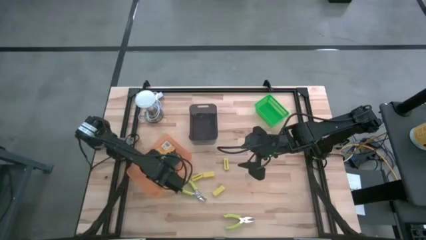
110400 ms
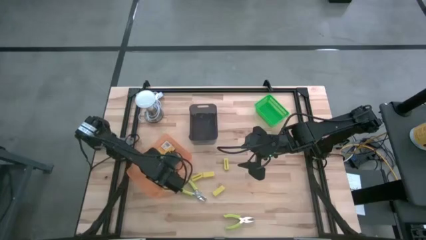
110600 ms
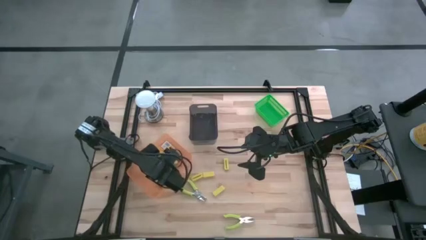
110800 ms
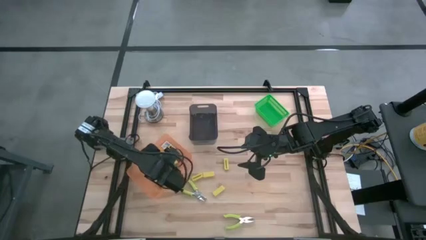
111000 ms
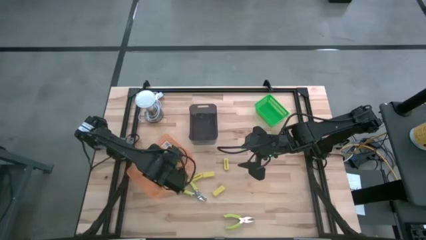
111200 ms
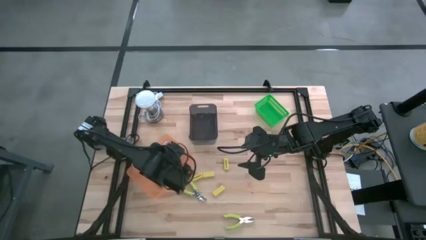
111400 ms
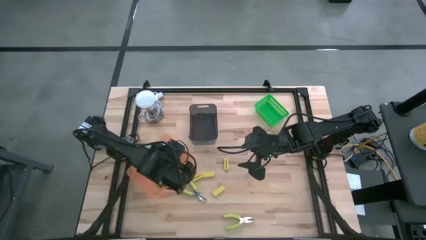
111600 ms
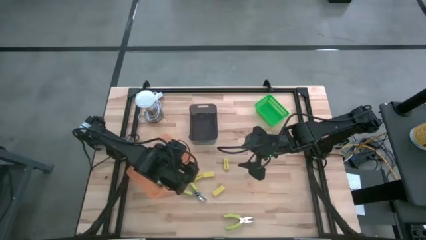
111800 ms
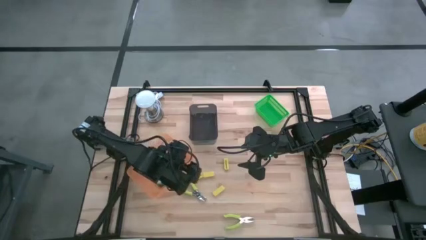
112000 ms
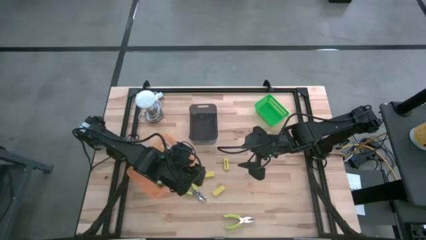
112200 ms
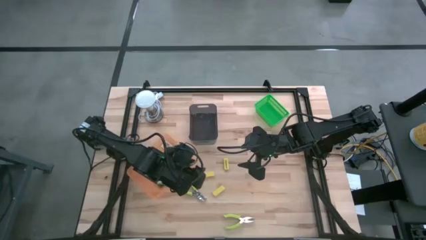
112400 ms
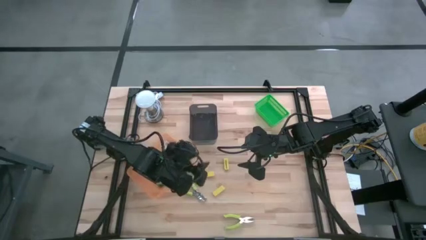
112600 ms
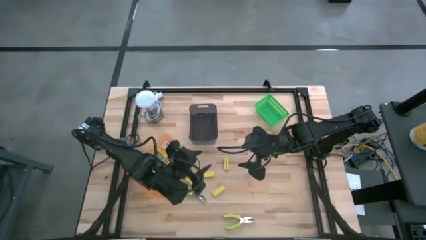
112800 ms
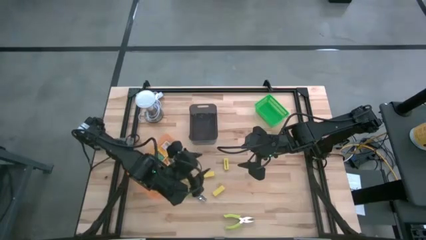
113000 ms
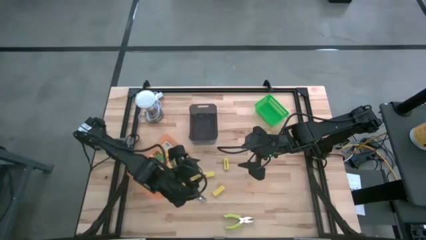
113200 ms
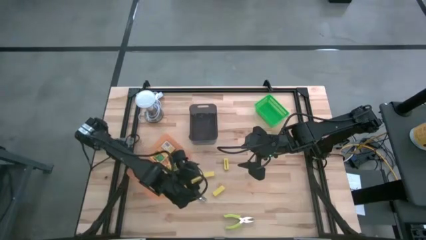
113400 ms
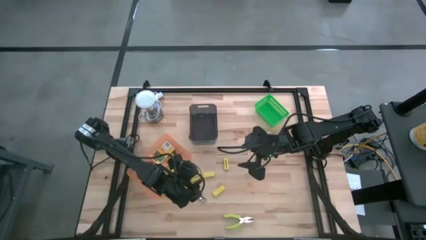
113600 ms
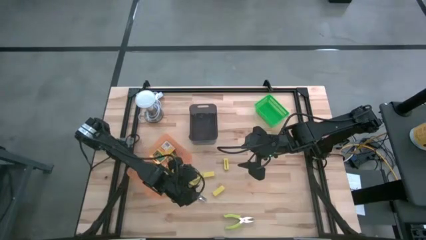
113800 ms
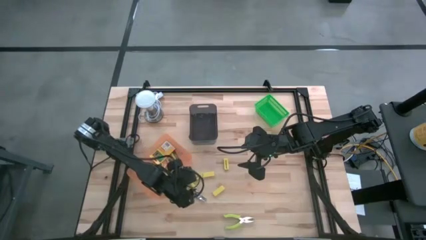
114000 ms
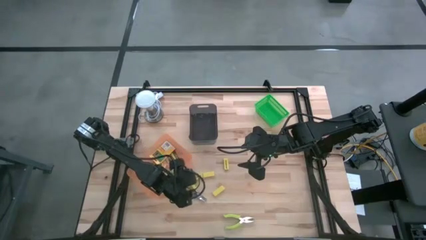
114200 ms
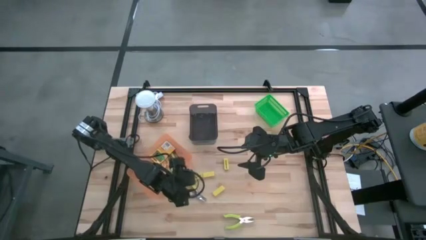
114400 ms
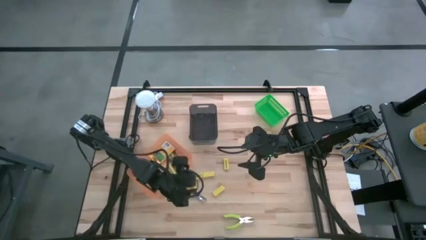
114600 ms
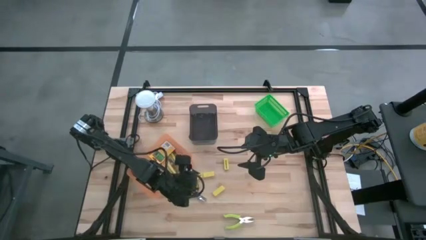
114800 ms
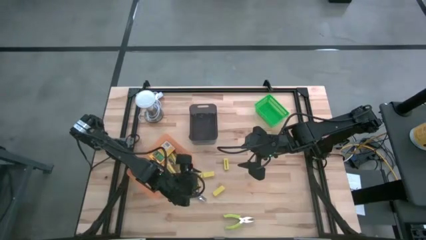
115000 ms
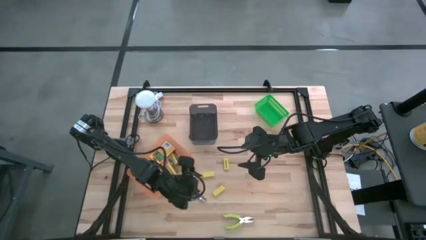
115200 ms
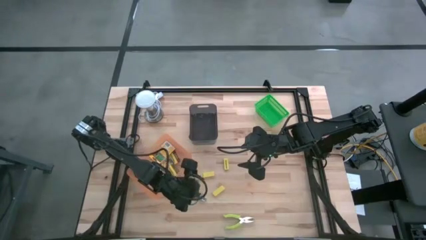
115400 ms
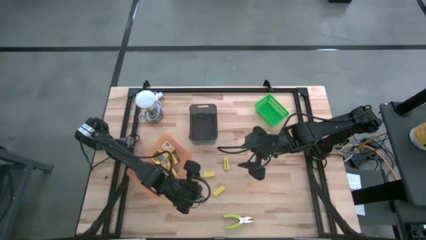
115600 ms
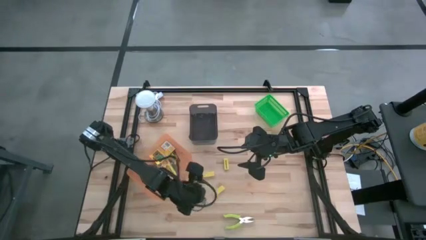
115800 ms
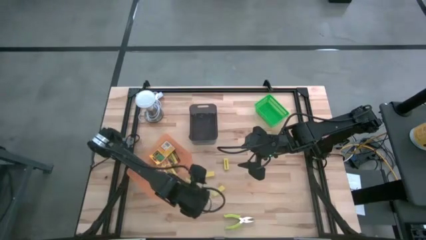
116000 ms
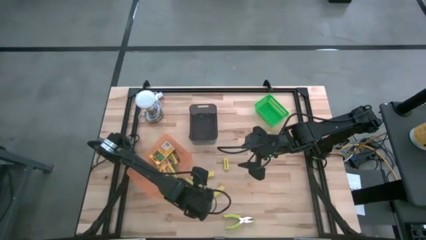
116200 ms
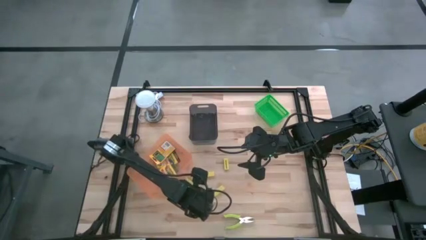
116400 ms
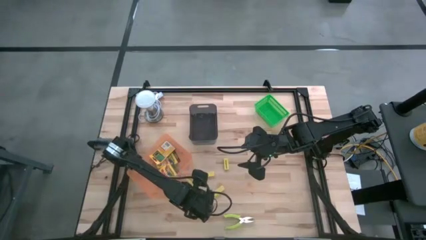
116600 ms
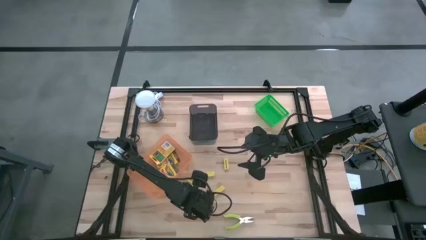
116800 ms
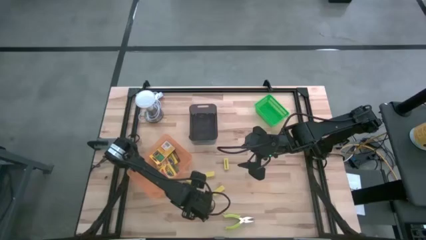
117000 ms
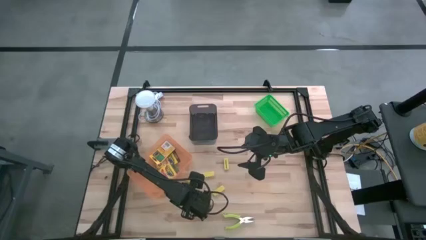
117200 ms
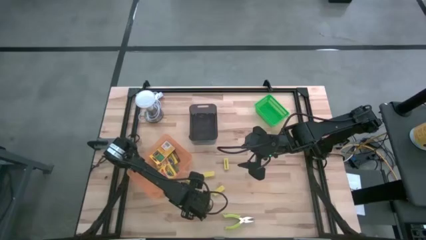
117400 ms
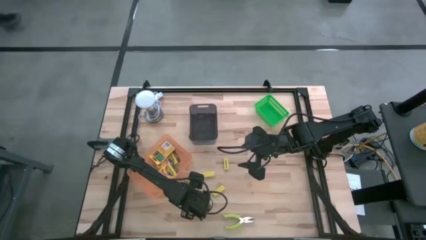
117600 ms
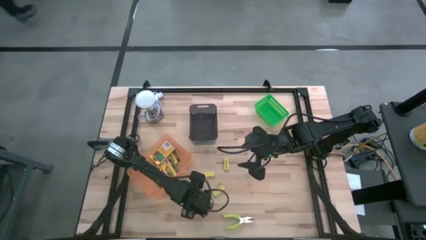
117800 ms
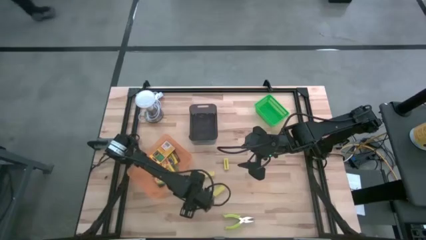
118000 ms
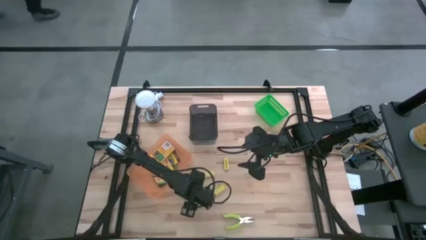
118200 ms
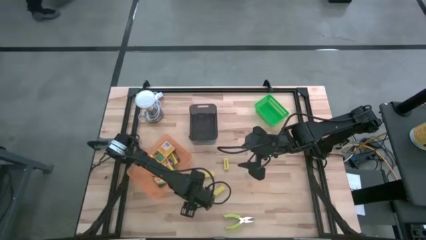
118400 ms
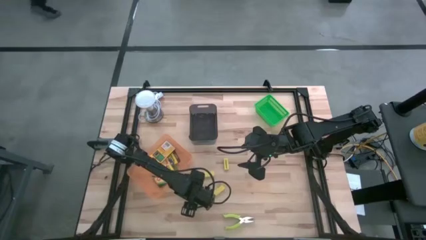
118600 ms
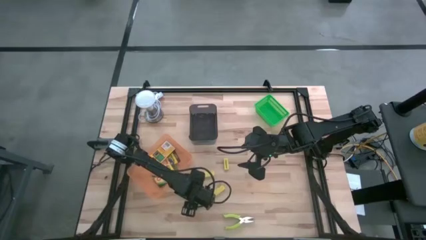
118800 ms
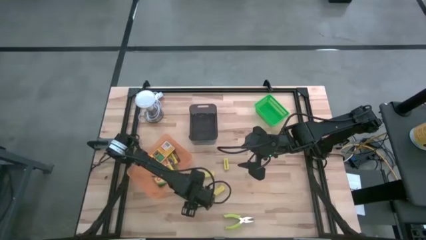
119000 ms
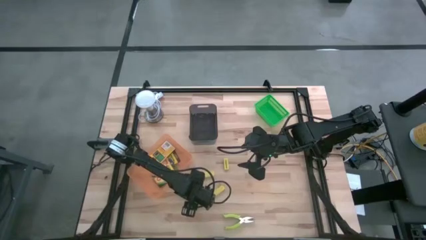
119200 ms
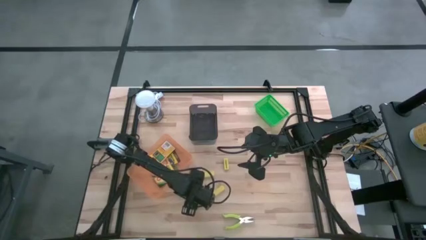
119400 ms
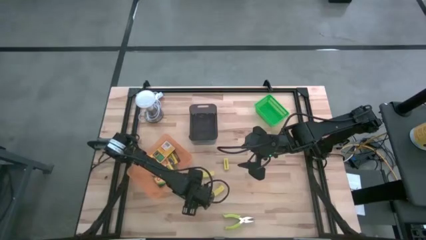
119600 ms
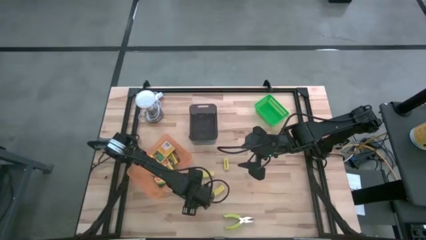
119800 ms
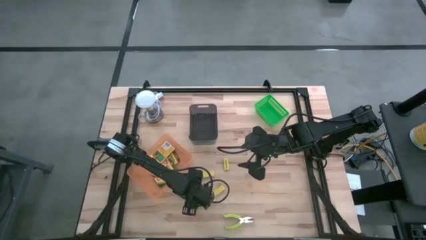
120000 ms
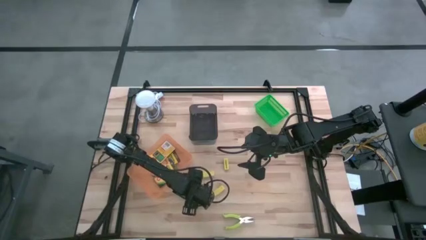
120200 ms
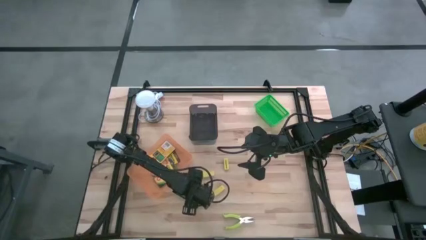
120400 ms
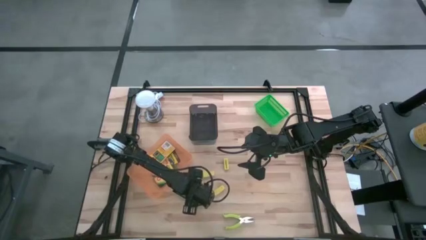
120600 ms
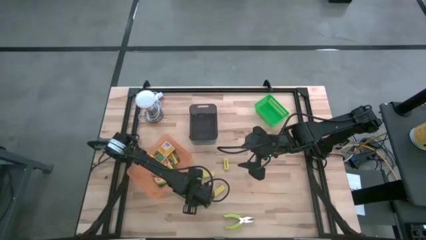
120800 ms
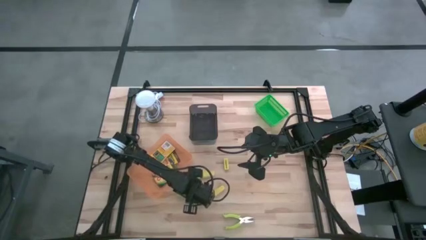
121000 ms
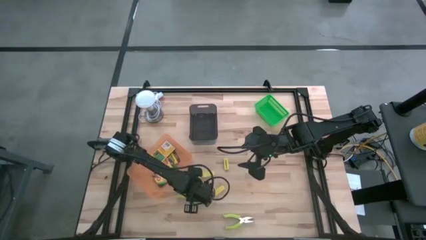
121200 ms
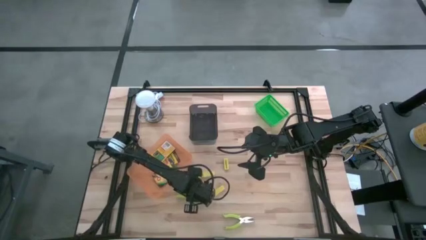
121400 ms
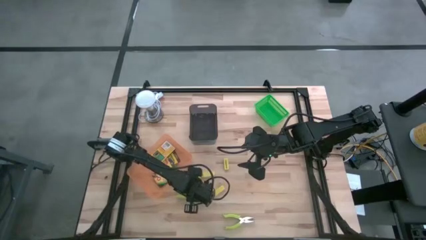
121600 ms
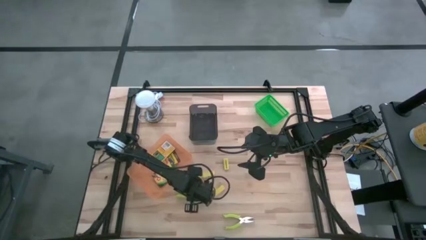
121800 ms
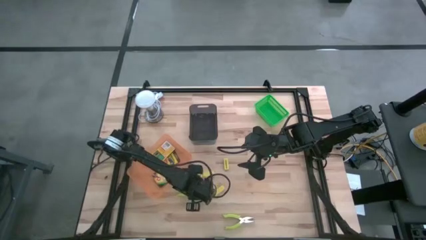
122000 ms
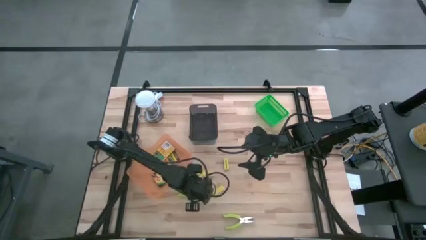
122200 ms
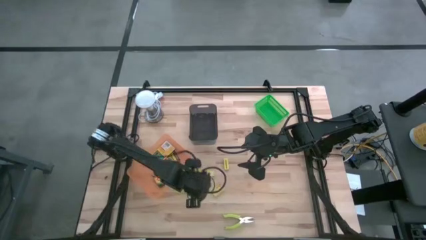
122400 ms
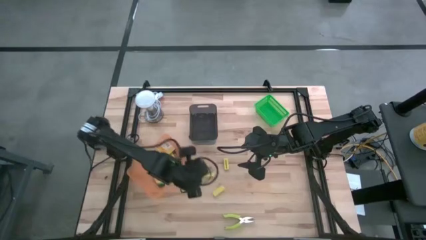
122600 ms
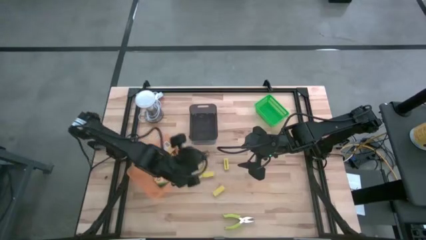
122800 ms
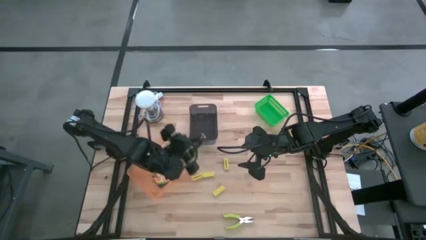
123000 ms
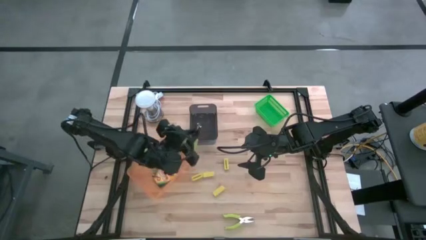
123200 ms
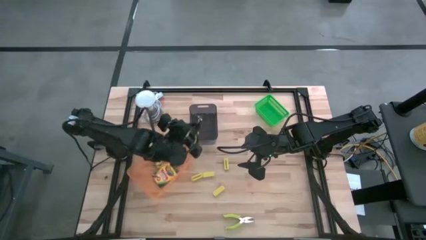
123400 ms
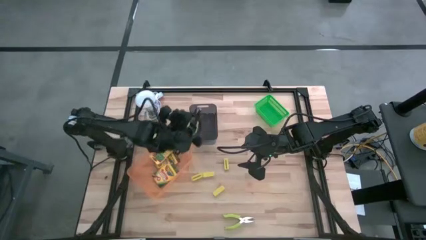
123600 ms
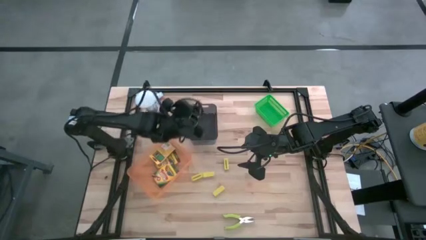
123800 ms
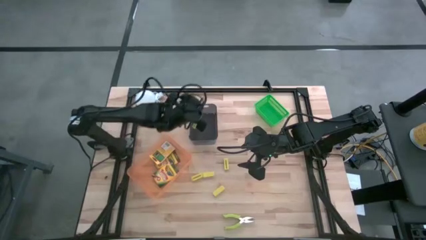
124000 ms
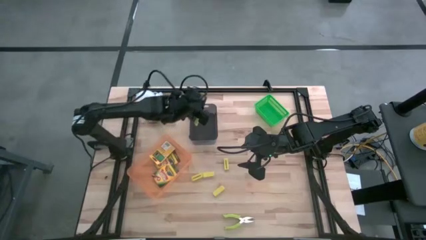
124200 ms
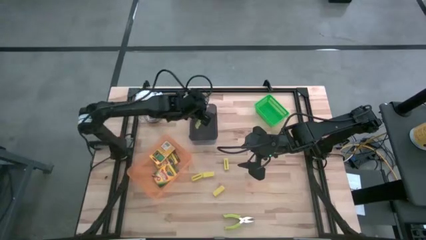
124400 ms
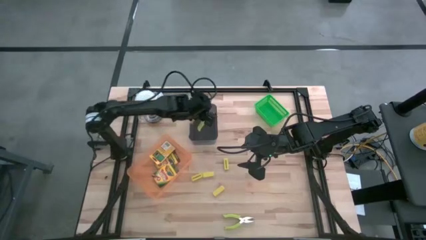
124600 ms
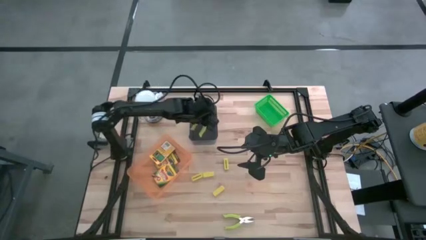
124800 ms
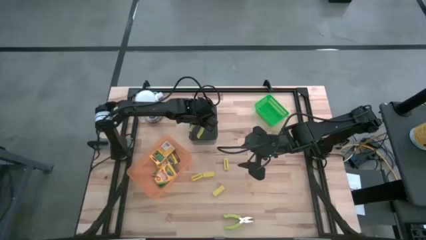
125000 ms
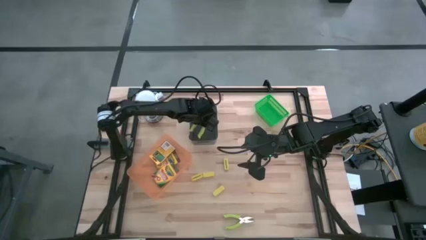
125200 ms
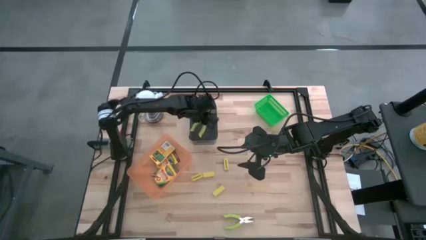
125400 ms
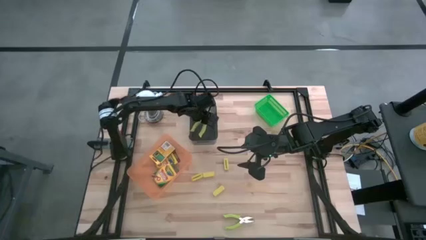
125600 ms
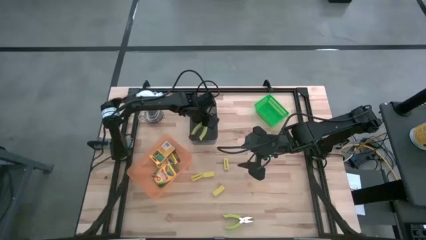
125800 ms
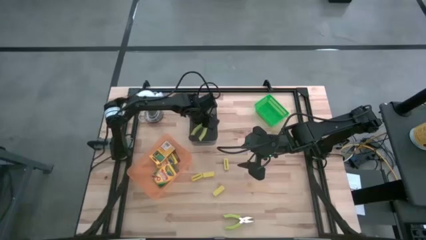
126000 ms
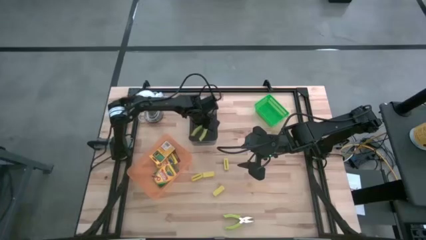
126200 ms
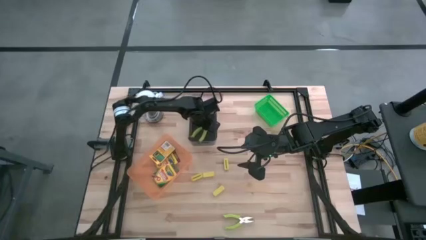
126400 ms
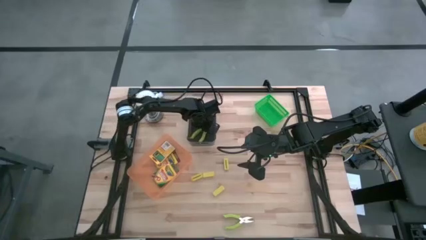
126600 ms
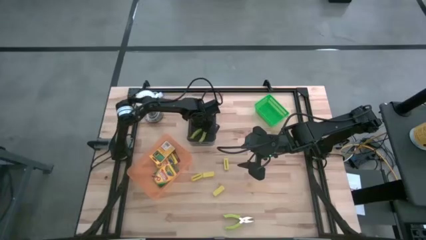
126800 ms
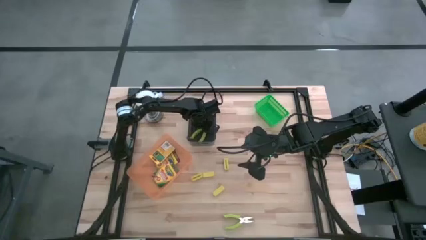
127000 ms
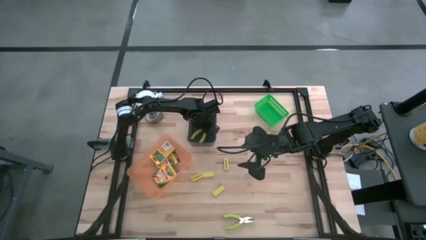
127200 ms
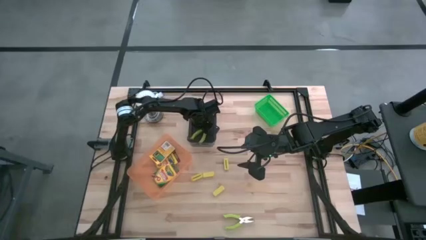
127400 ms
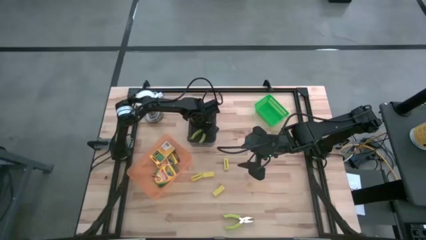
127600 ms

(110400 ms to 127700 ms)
Task: Pick & Place School Supplies
Put the green punch plier into the black bin
